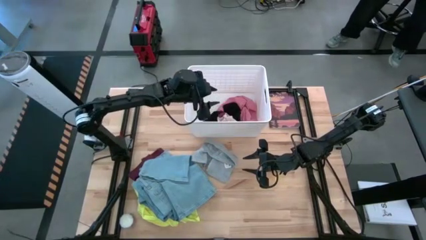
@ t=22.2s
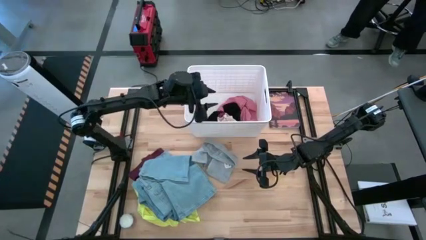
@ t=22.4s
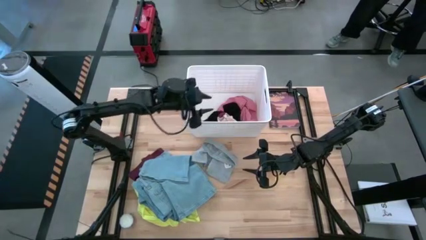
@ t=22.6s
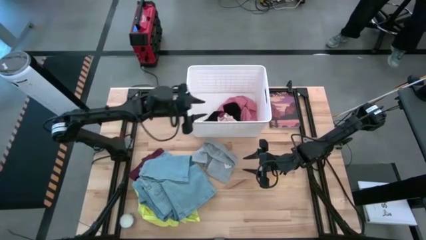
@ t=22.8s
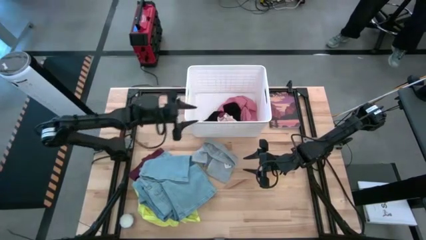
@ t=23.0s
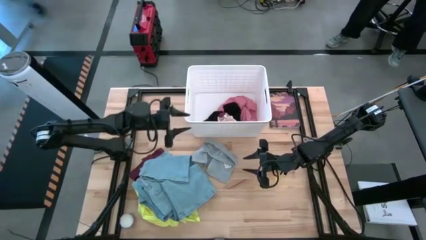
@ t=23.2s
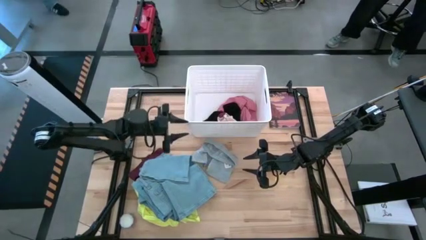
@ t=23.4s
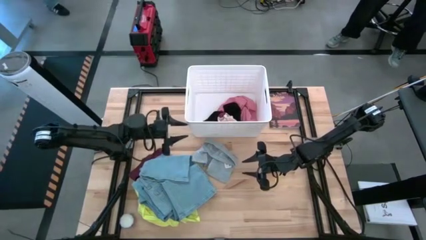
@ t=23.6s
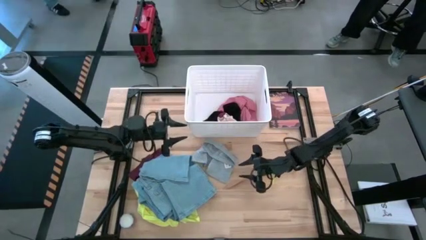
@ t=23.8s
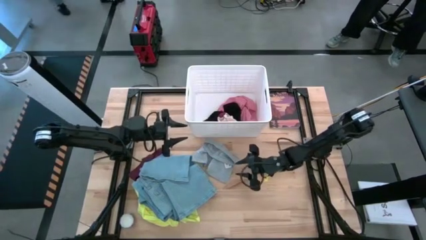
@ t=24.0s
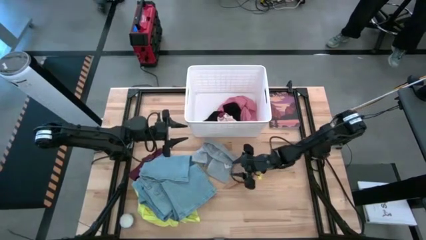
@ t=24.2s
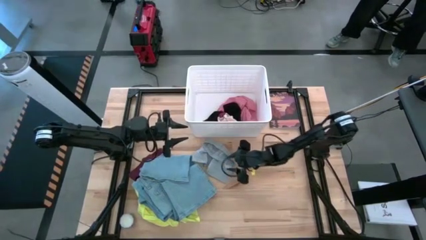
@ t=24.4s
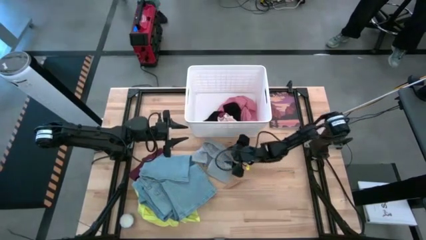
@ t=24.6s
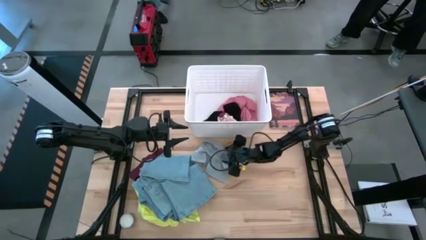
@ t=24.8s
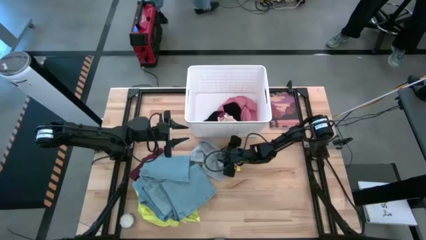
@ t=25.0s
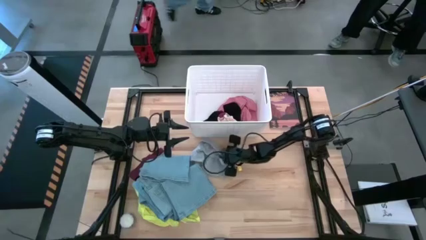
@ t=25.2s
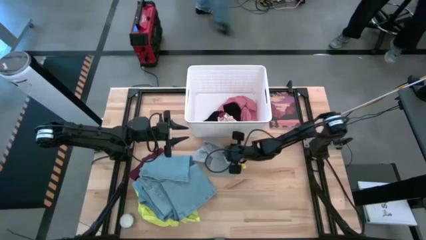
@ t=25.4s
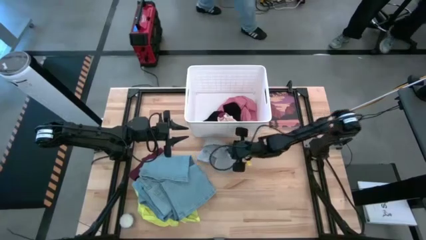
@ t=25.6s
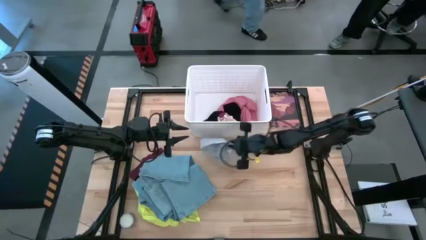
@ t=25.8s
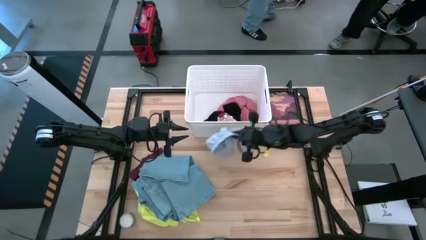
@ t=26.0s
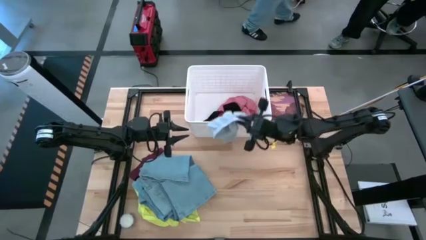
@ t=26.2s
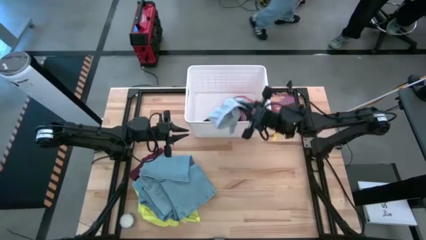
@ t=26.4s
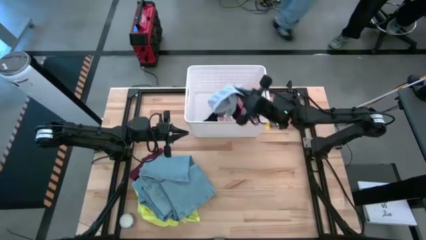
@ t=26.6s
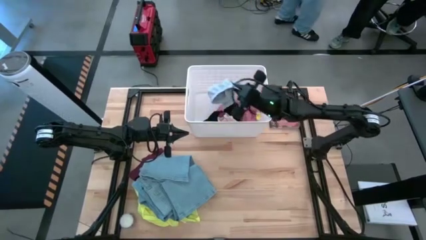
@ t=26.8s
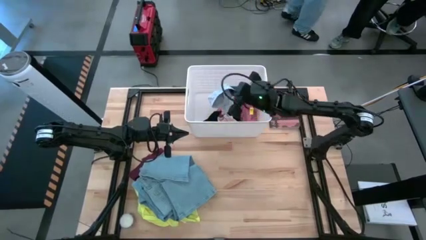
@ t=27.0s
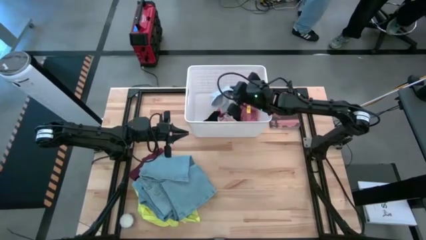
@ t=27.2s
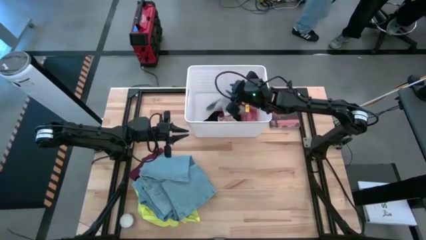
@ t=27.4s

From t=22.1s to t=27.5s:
Task: Sort clothes
Put the gray underwear into the white laundry bin

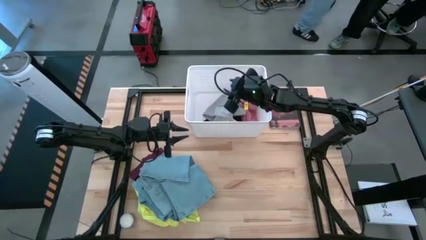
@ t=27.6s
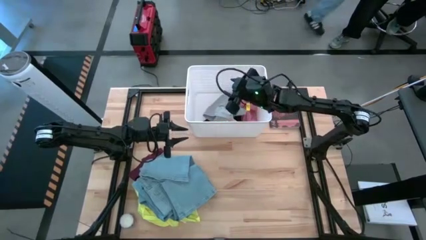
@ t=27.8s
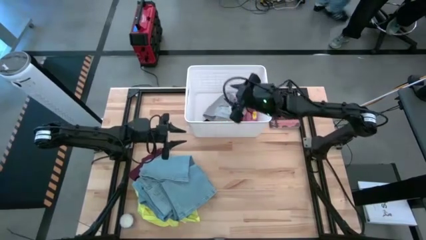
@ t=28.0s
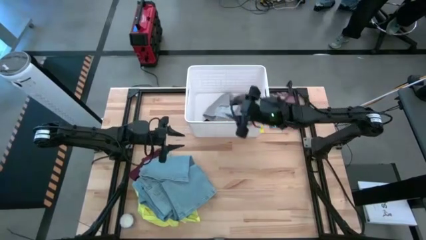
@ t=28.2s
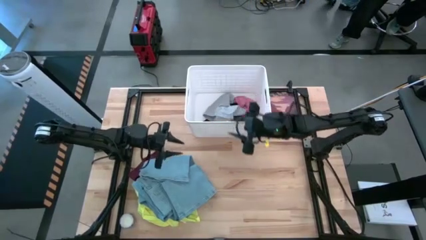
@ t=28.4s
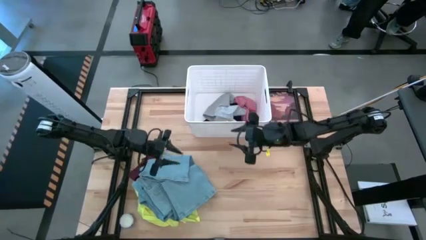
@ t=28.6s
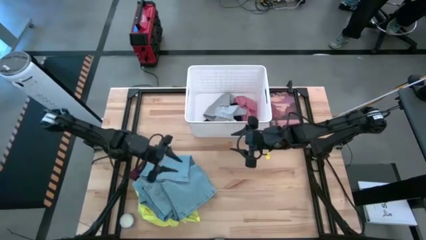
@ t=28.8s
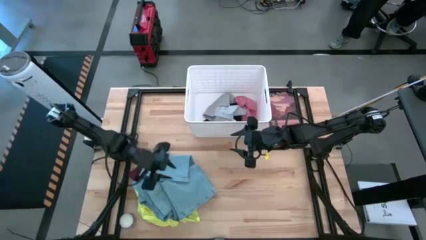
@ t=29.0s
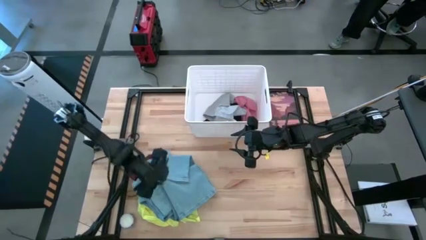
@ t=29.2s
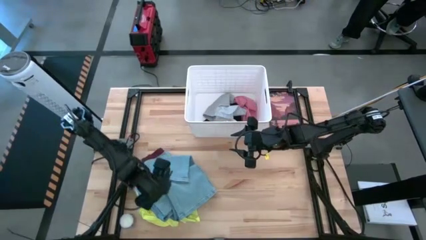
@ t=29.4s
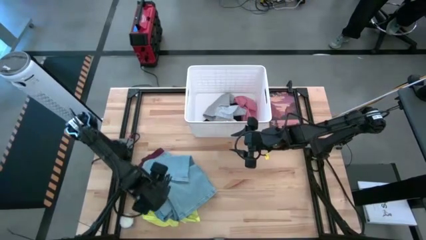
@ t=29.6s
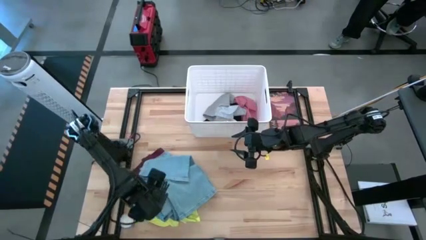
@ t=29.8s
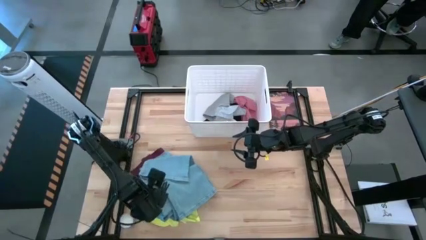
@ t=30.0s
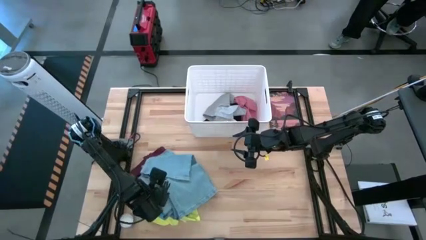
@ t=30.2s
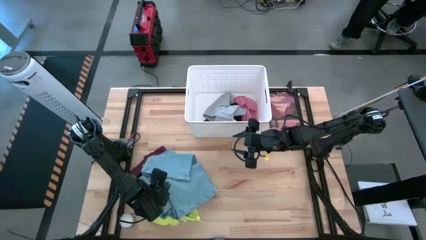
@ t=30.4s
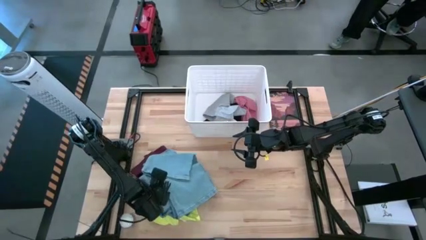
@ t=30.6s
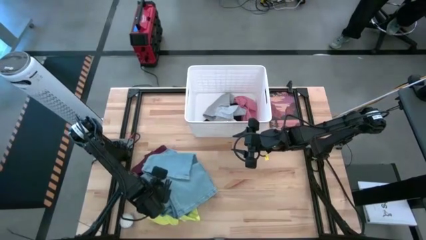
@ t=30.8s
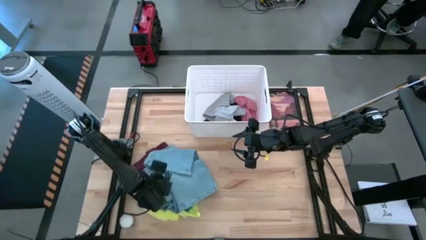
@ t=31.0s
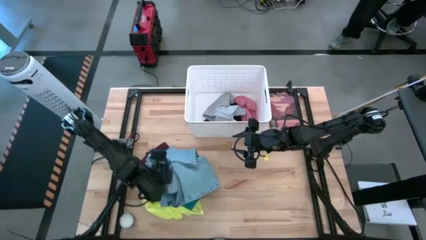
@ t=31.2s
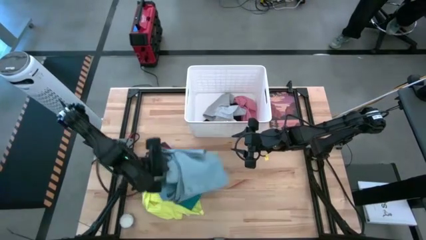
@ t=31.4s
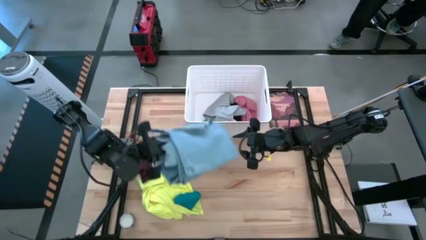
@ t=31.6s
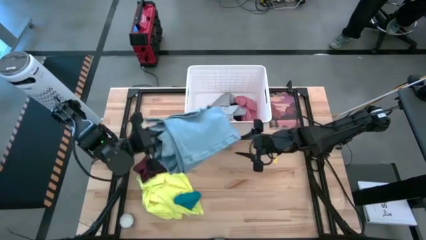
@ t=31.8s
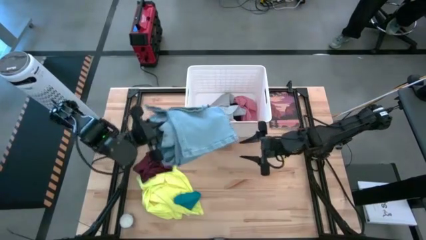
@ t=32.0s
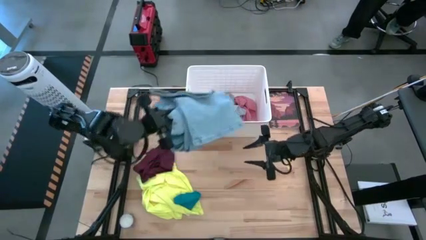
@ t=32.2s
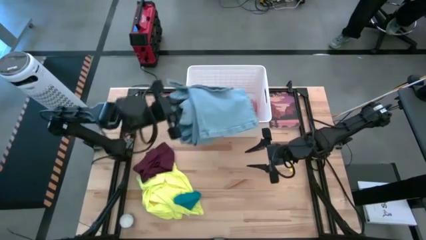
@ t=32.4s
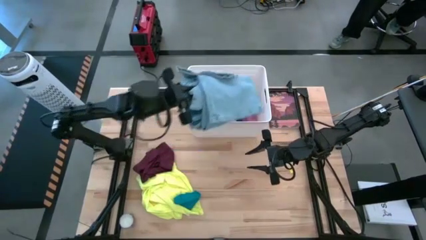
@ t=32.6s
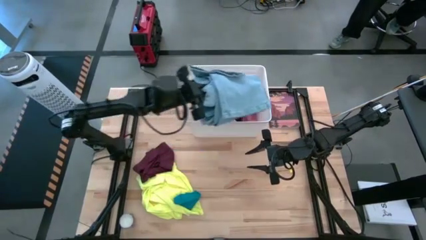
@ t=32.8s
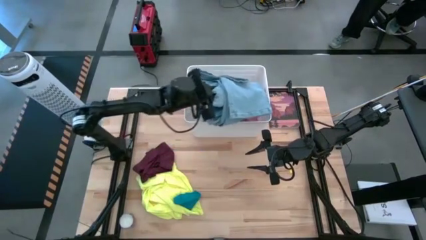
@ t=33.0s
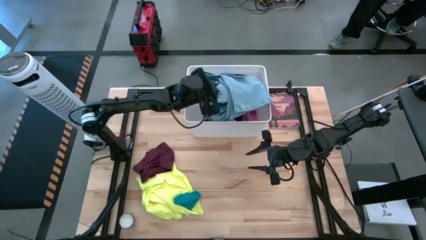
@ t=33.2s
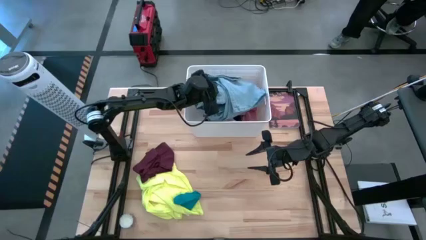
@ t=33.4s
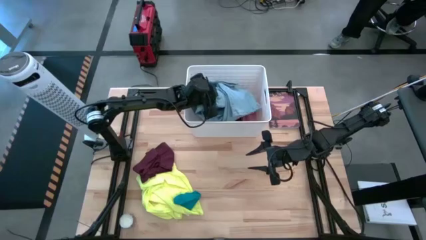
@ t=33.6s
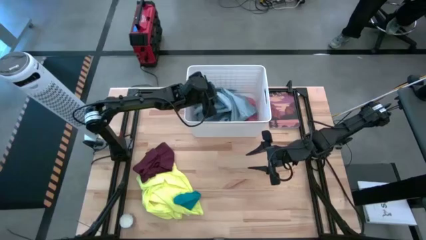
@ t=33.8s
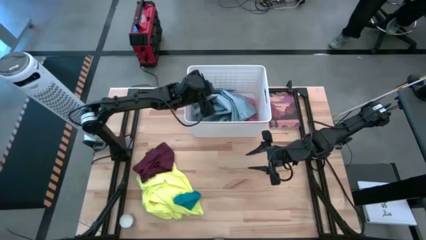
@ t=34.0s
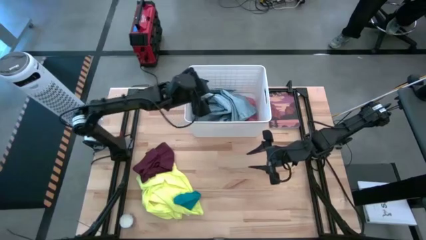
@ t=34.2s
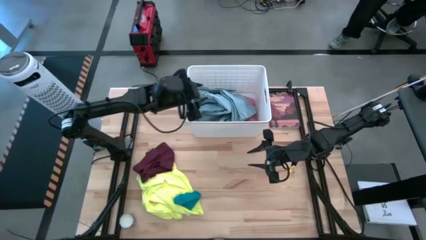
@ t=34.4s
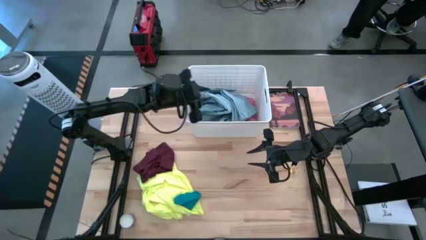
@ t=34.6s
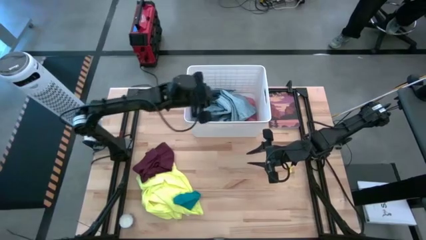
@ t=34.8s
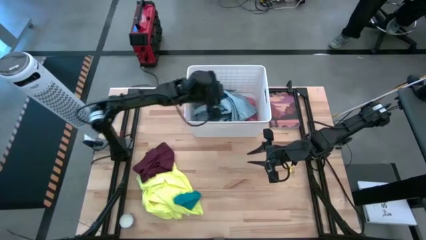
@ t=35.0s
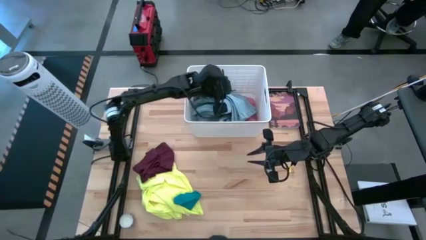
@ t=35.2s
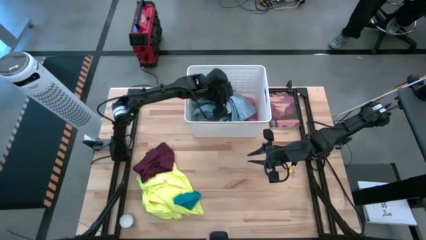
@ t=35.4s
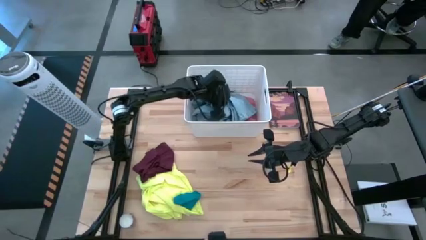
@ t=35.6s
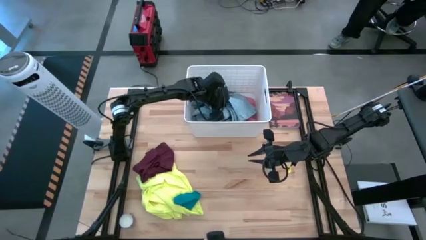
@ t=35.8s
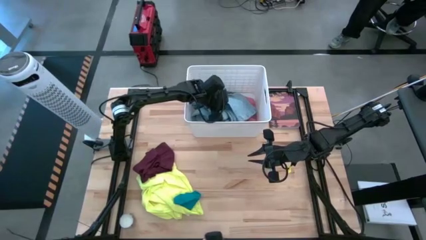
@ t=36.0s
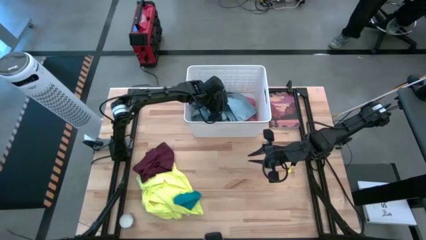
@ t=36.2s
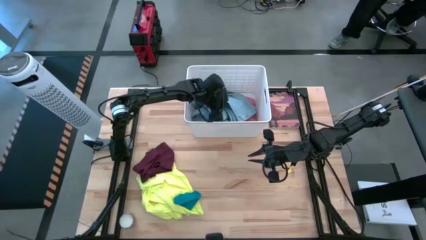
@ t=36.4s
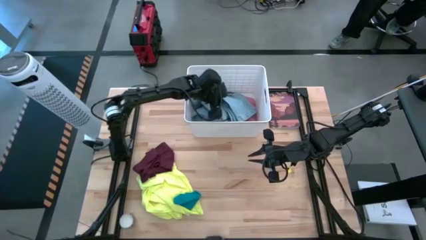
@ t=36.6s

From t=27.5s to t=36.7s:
Put the blue pants into the white laundry bin

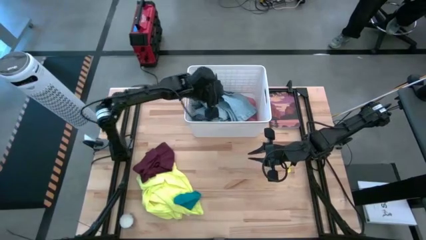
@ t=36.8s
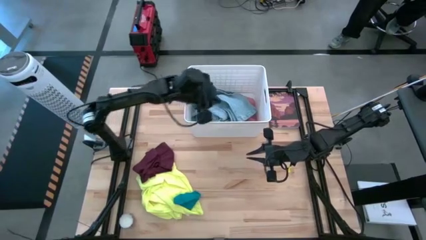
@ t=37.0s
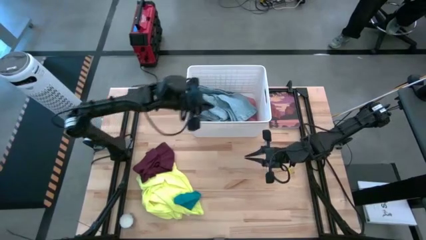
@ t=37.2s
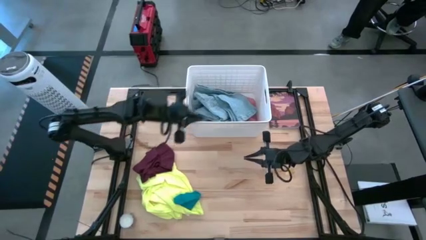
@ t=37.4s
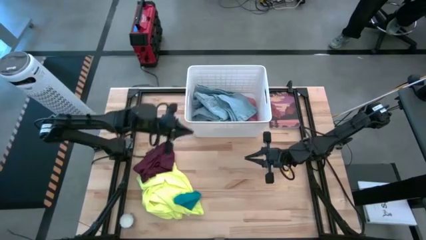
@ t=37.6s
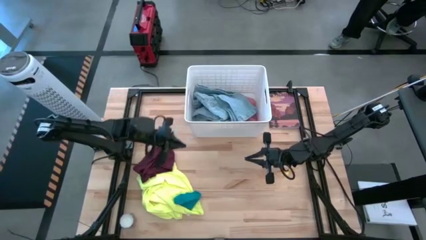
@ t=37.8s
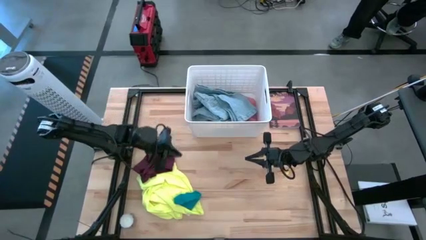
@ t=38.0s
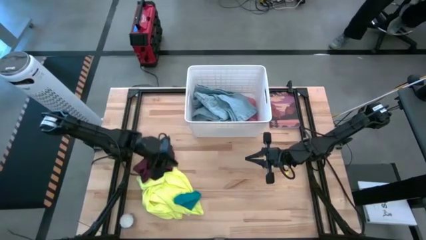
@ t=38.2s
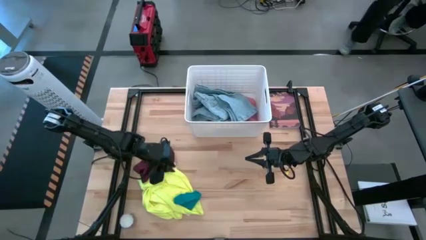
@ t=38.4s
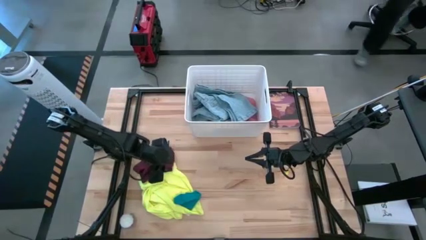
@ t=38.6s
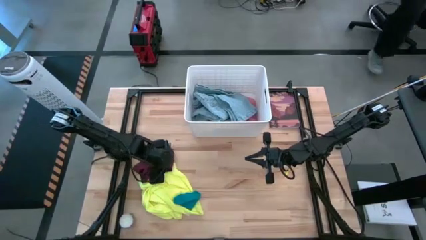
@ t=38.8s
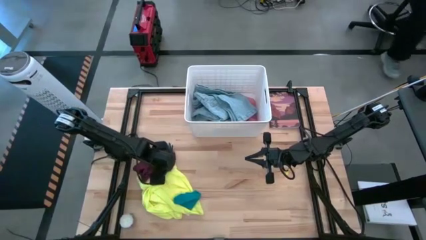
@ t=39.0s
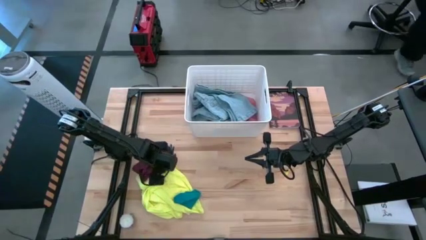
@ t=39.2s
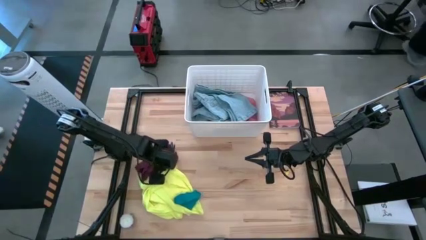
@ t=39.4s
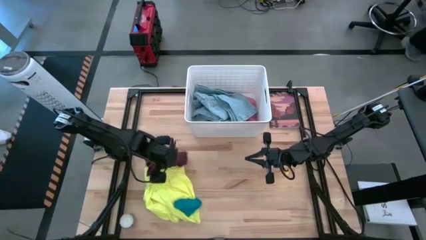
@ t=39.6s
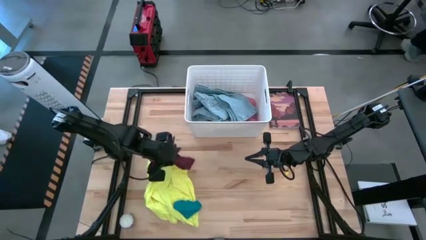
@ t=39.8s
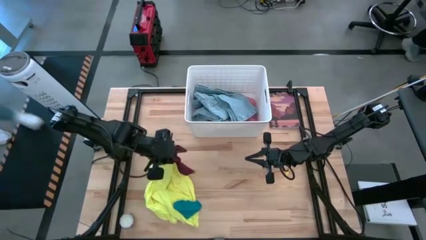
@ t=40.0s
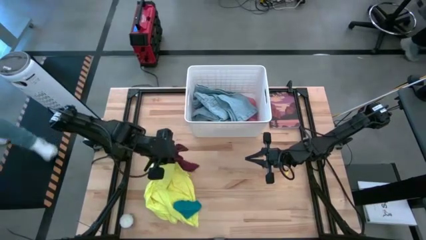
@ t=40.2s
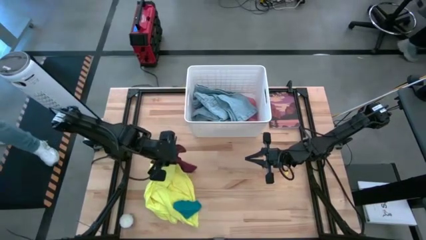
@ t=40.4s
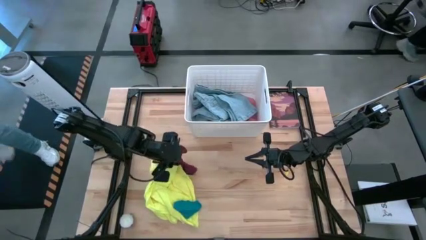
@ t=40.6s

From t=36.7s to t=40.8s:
Put the red underwear into the white laundry bin
